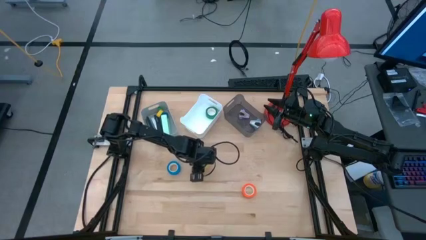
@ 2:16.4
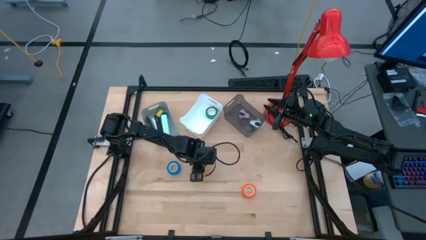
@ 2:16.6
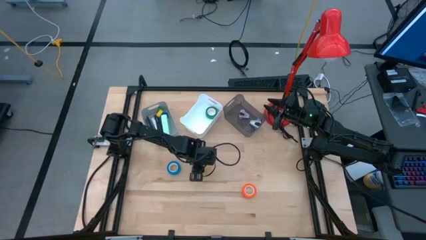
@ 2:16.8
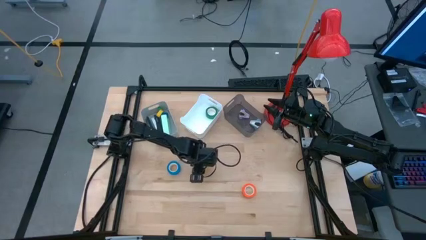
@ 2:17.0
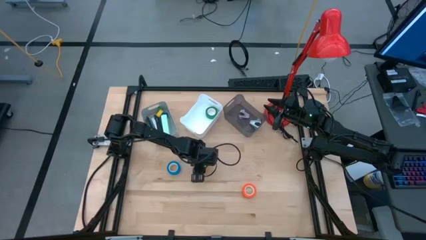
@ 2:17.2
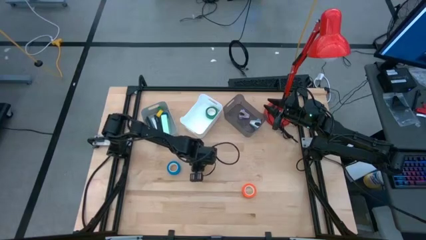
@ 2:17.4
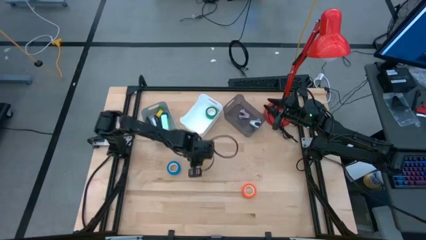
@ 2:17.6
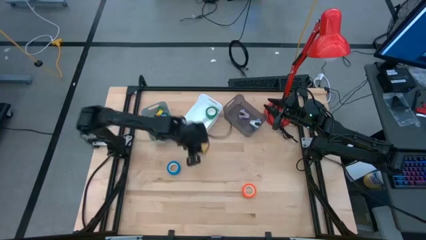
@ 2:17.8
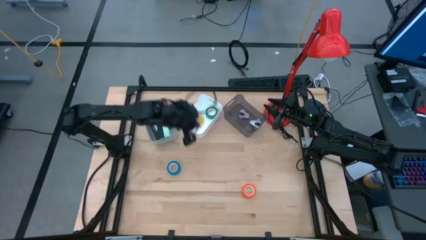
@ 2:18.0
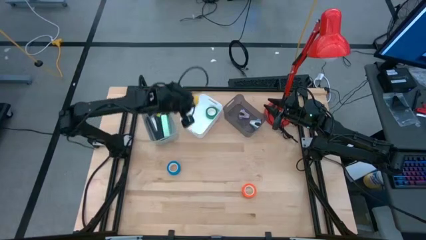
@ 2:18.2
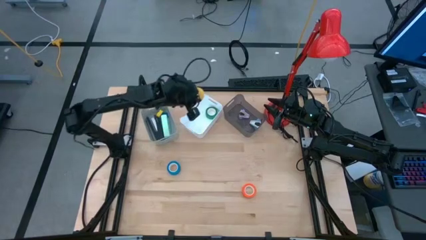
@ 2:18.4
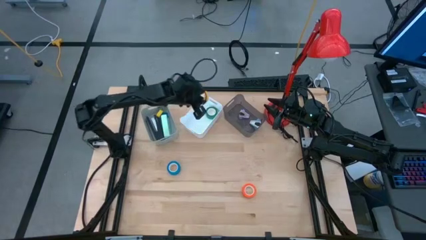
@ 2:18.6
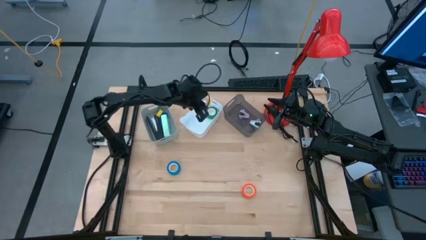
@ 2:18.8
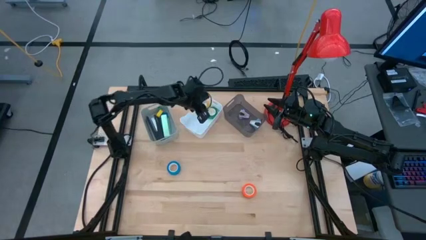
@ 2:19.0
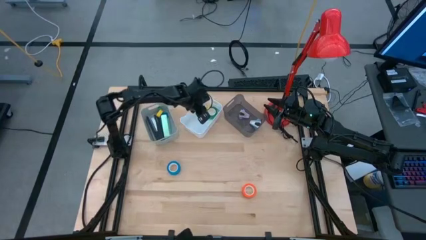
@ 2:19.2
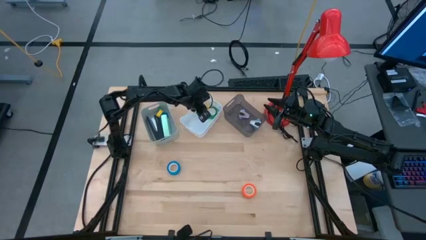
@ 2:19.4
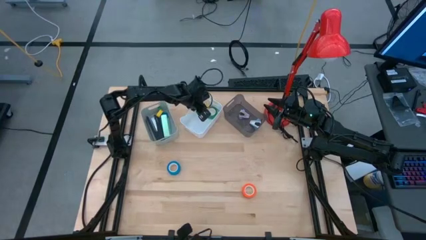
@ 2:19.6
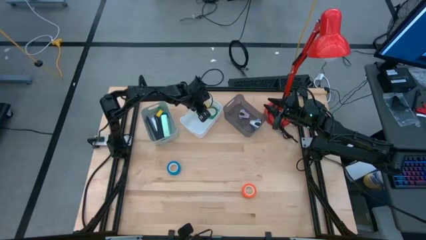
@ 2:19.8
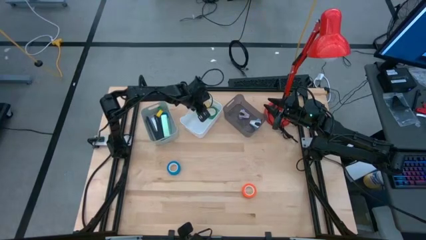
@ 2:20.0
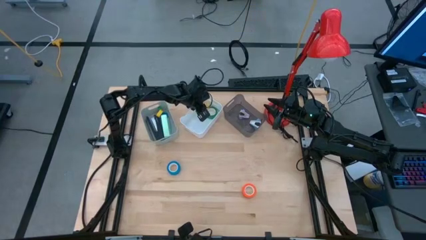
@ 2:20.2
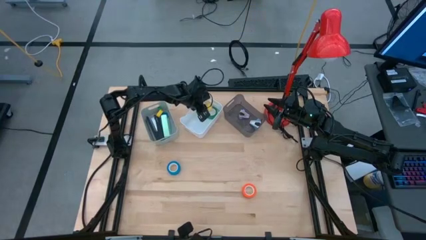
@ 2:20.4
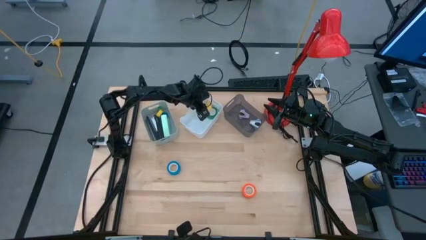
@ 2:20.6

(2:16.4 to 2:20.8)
Task: Pick and place Stapler, Stapler remover, tape
Put the yellow tape into the white bin

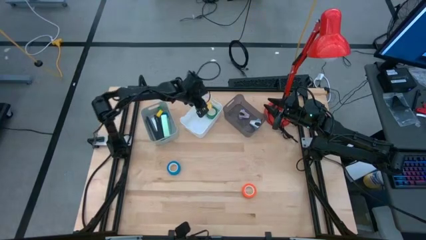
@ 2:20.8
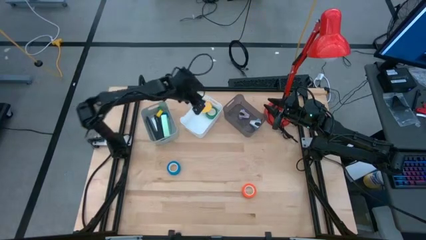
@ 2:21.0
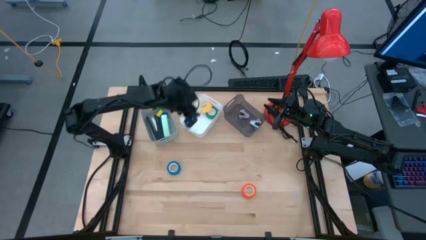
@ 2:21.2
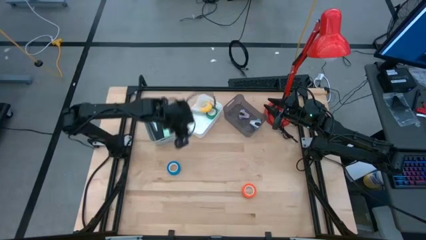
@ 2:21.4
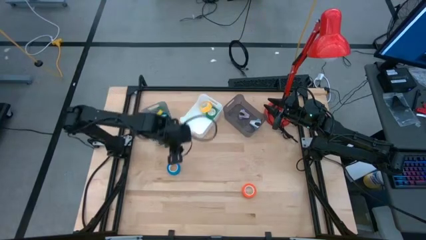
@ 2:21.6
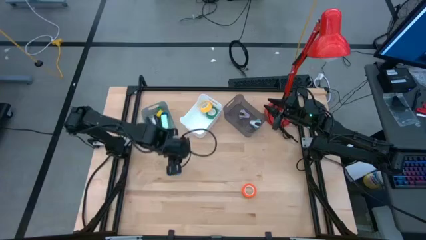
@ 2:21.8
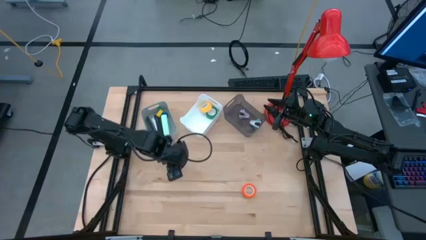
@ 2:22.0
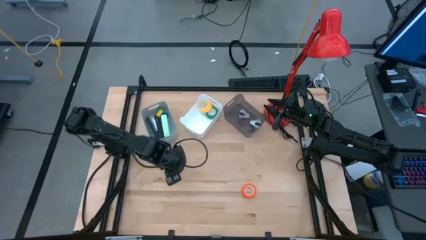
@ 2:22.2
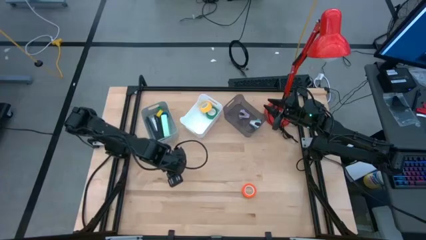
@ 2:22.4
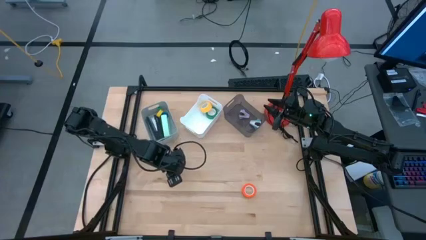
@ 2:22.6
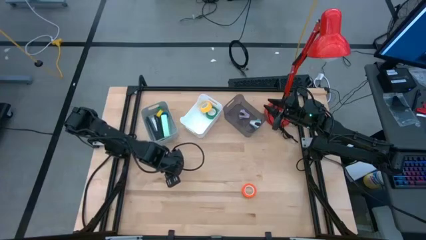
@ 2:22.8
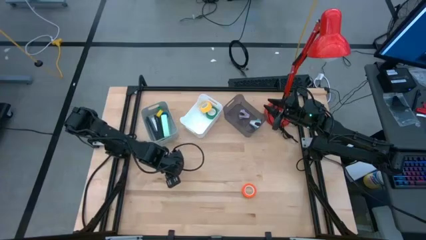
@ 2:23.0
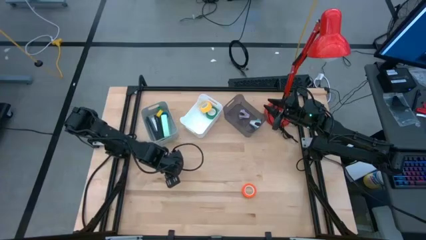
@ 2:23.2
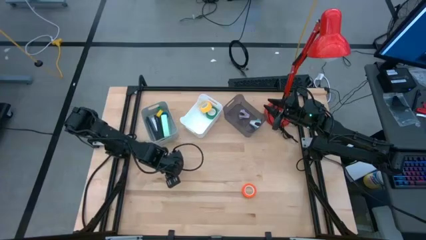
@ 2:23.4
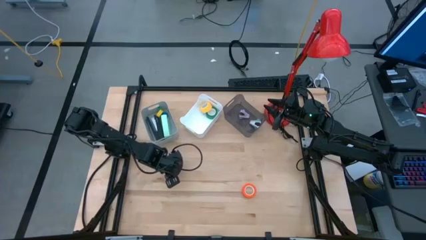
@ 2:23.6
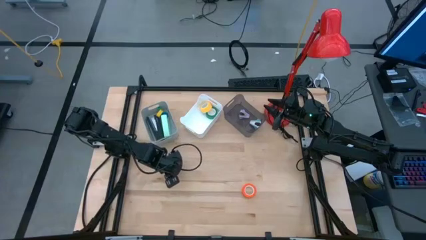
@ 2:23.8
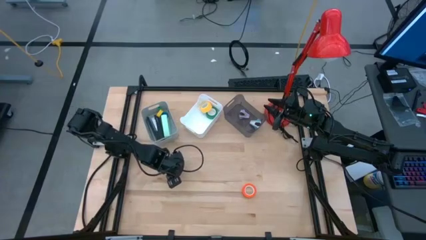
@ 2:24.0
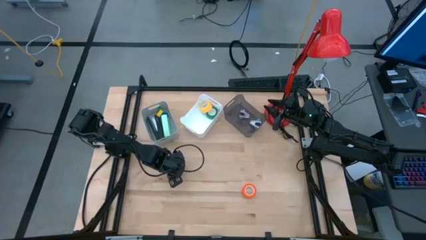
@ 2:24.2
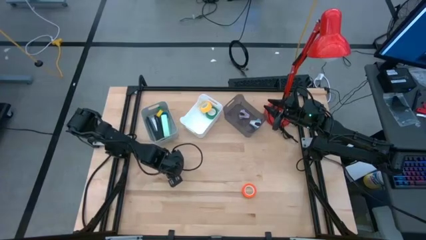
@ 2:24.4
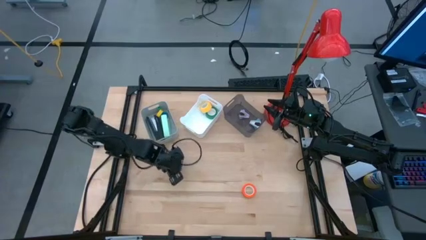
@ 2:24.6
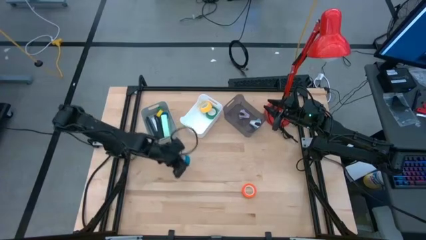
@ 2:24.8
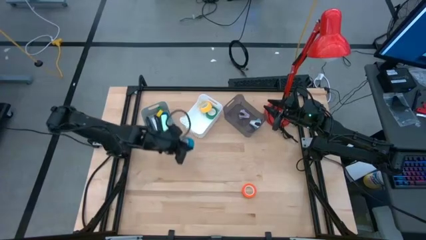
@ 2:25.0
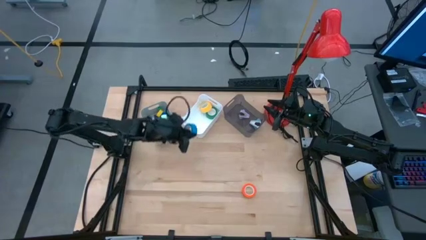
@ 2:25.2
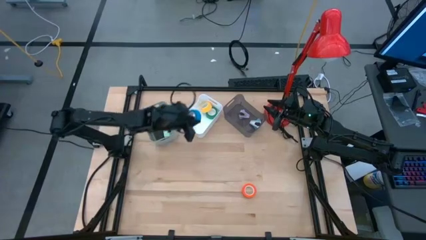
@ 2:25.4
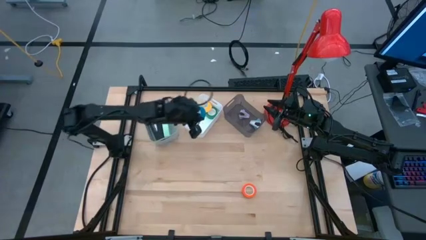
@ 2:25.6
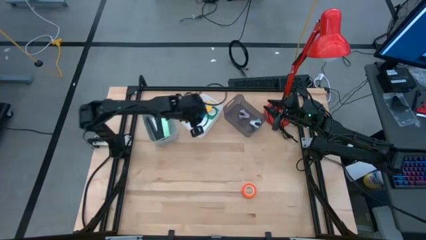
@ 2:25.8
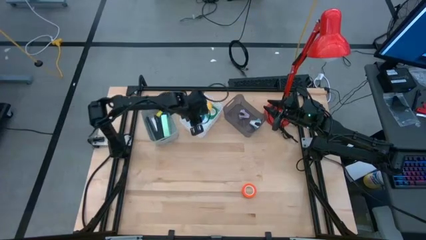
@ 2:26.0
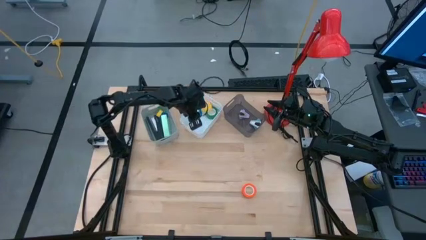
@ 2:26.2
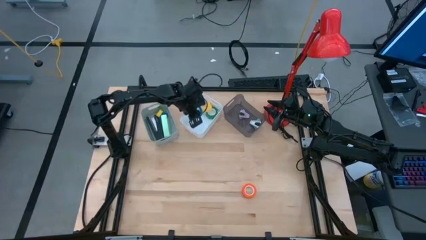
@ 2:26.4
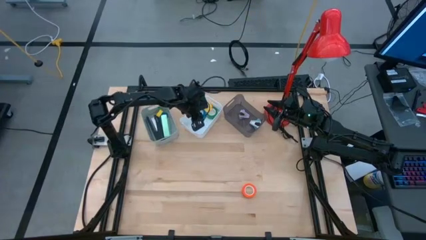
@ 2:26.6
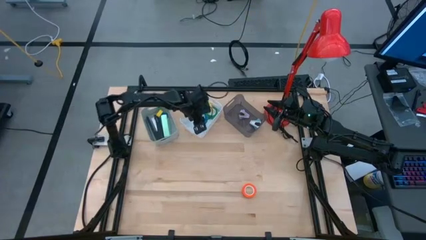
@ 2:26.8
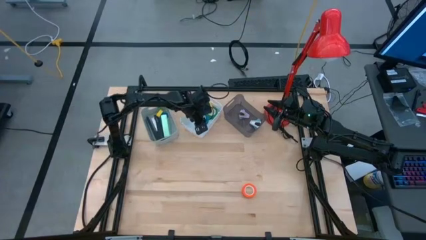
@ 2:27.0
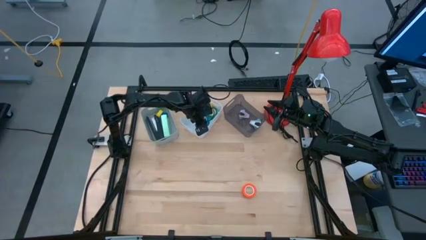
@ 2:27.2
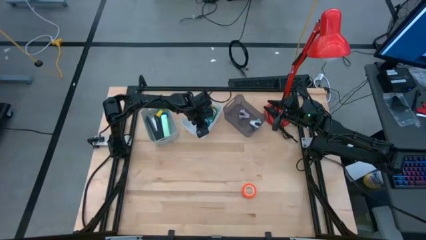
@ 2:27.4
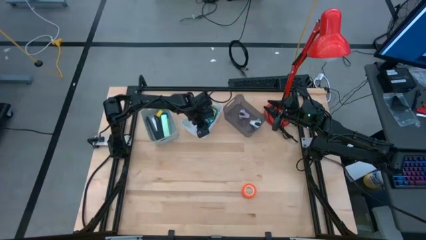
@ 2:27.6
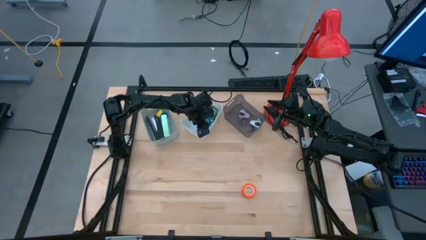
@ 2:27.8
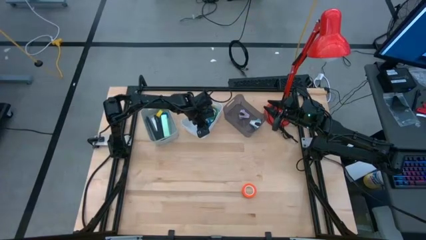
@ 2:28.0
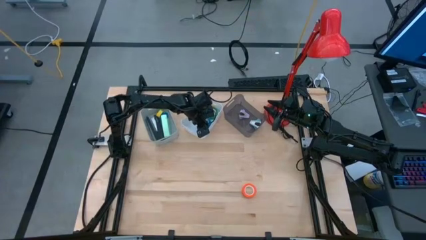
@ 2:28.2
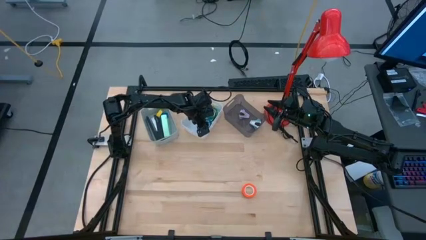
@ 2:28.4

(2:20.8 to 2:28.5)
Put the blue tape into the white bin
